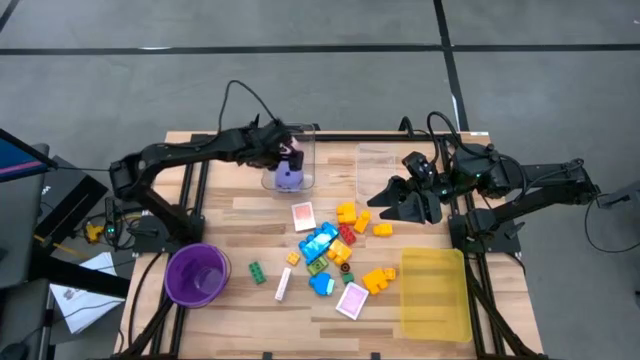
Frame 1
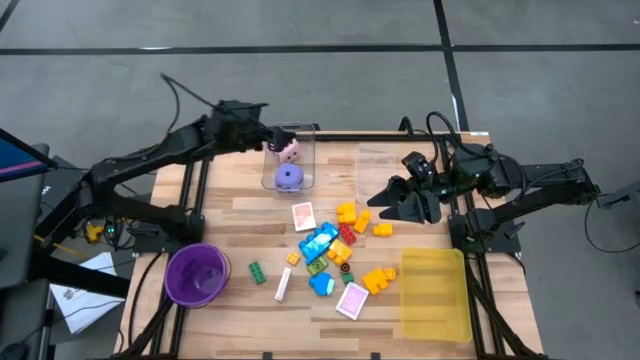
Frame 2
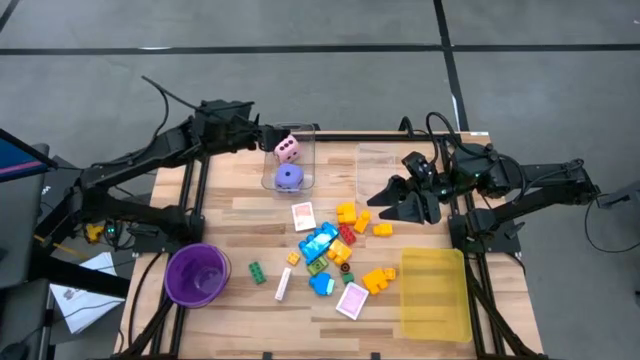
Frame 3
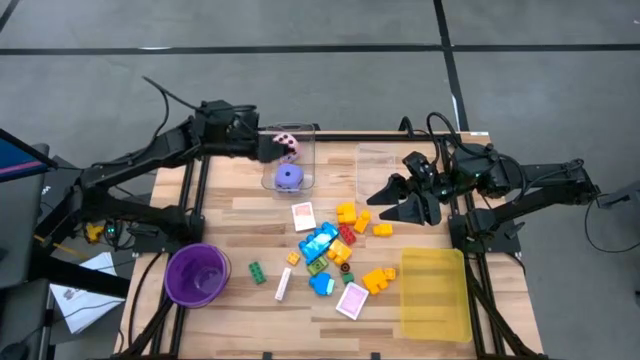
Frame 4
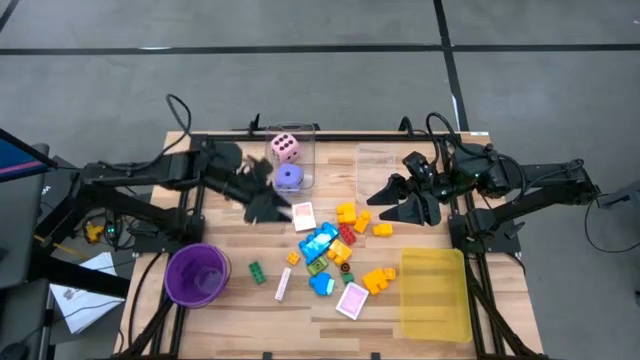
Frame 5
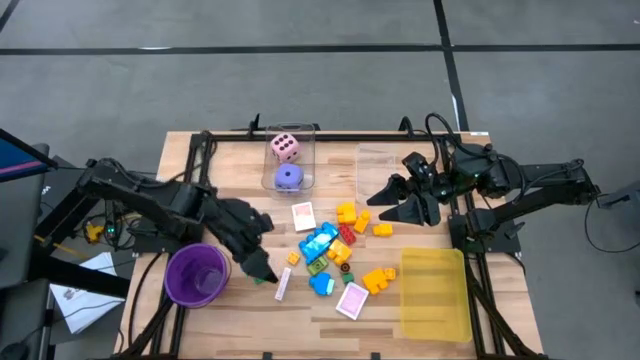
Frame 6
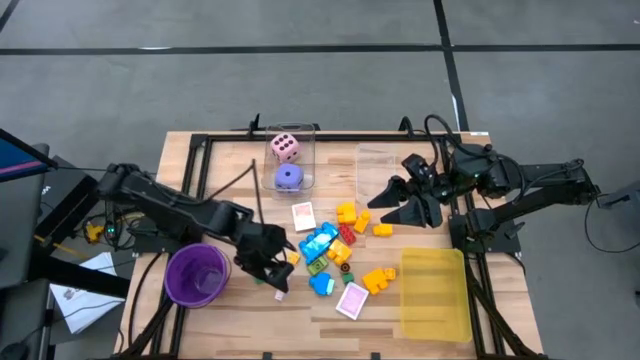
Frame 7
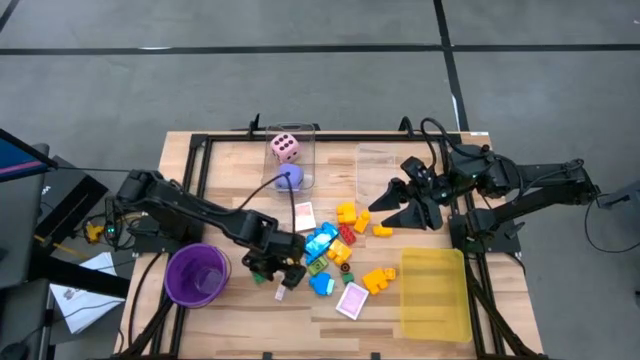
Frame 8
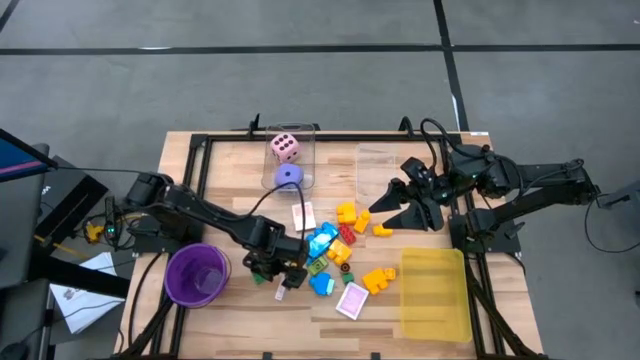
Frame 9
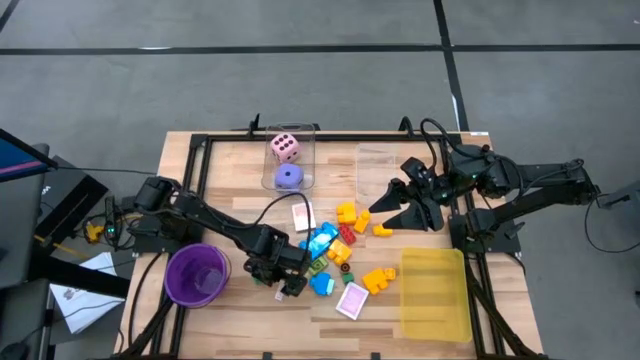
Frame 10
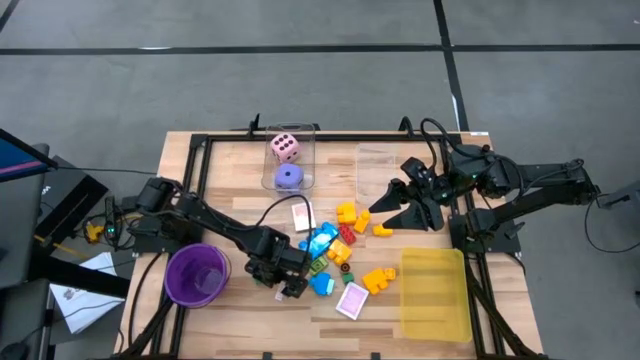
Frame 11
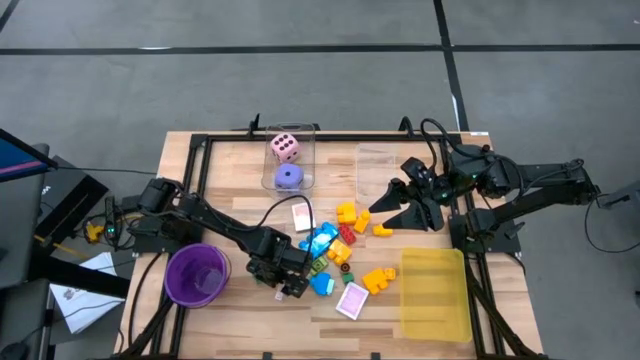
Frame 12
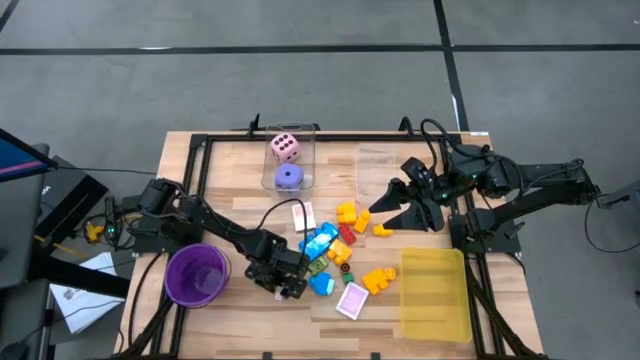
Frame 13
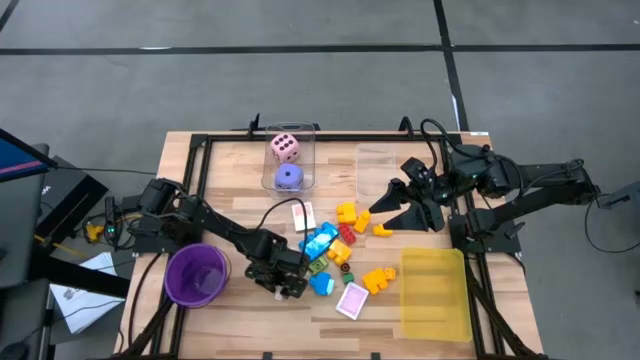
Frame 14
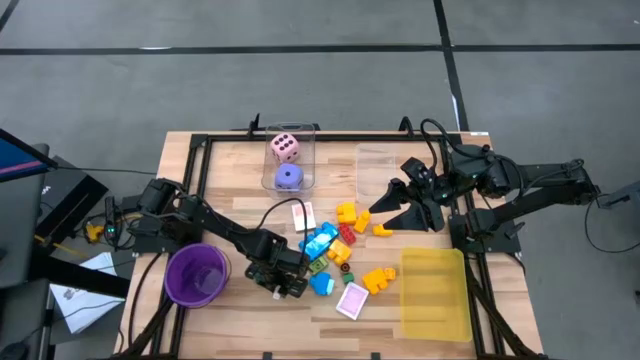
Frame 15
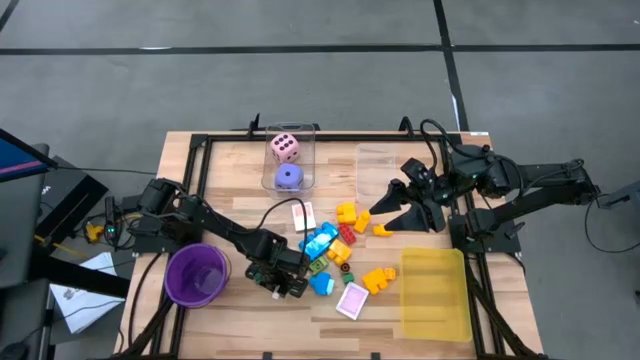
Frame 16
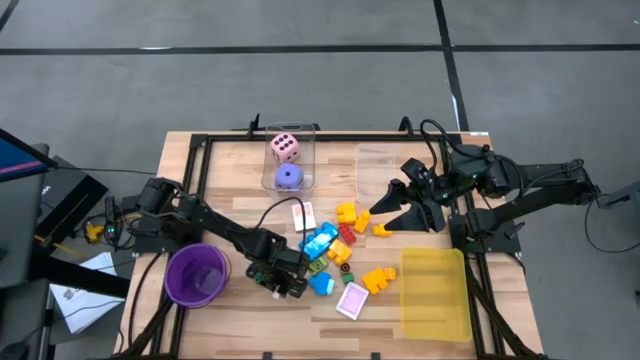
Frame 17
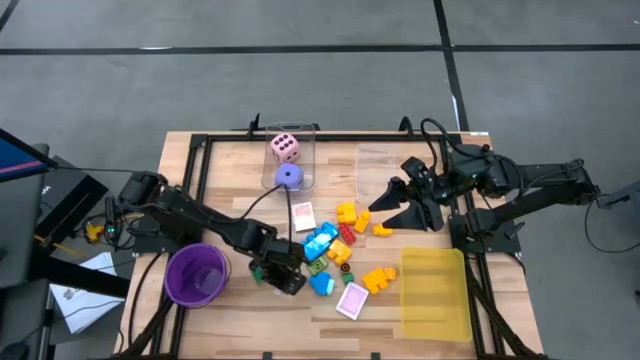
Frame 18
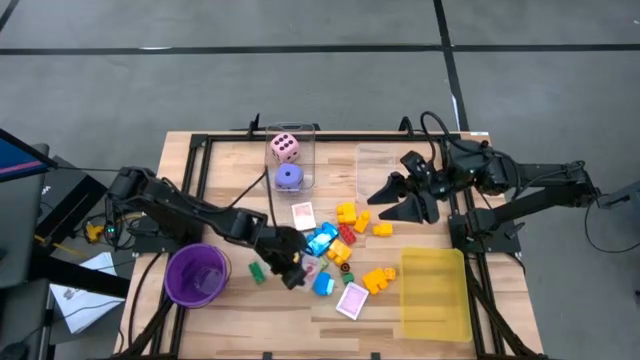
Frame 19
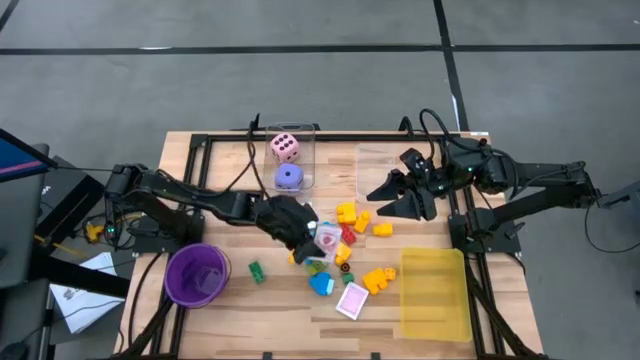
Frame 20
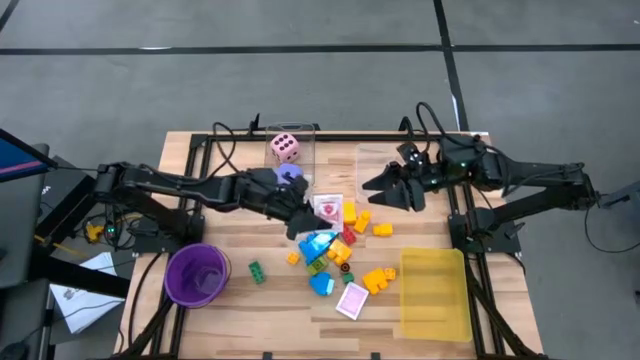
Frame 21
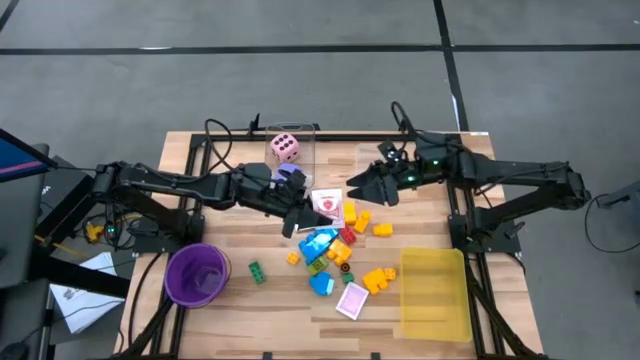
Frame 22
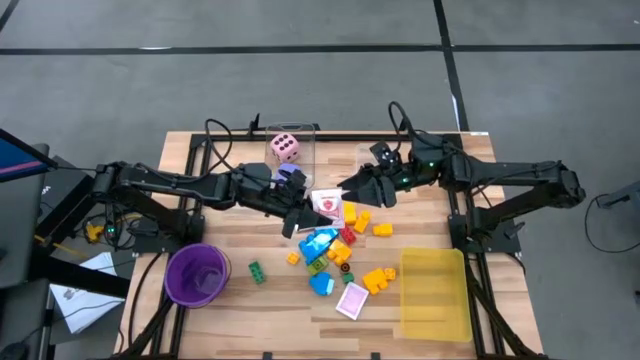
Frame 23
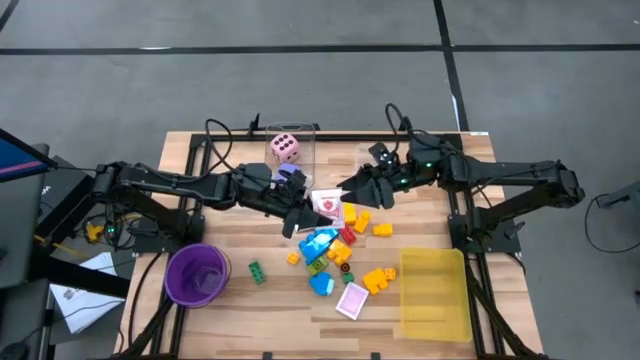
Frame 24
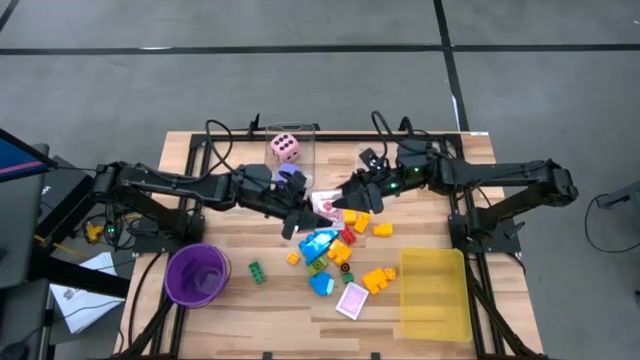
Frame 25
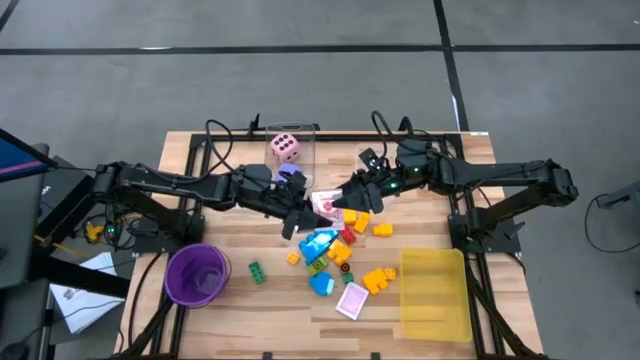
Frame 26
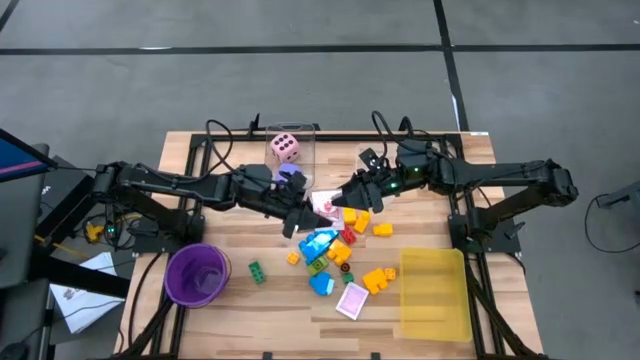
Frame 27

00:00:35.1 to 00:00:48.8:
Task: Pick & Place Toys
Put the red deck of cards into the right transparent bin

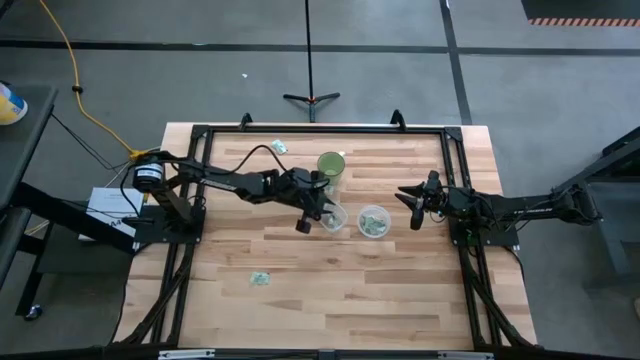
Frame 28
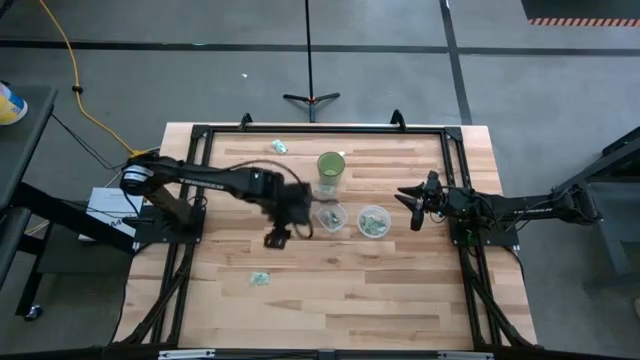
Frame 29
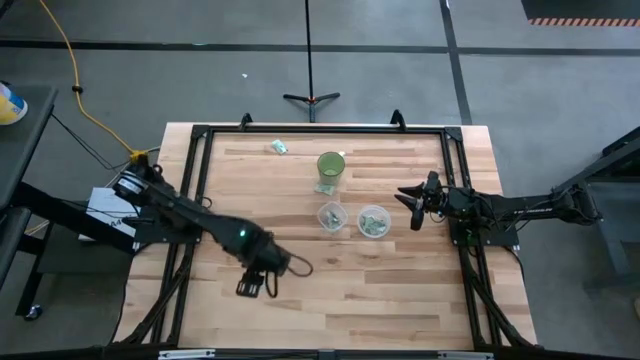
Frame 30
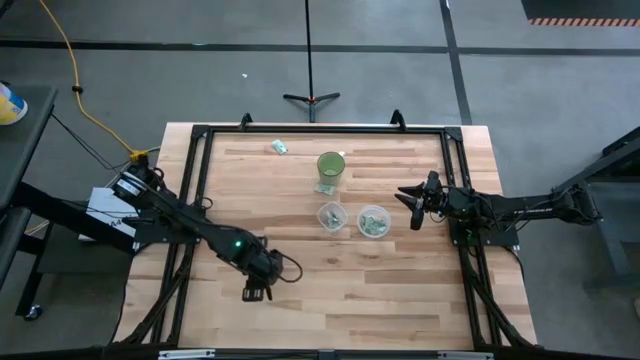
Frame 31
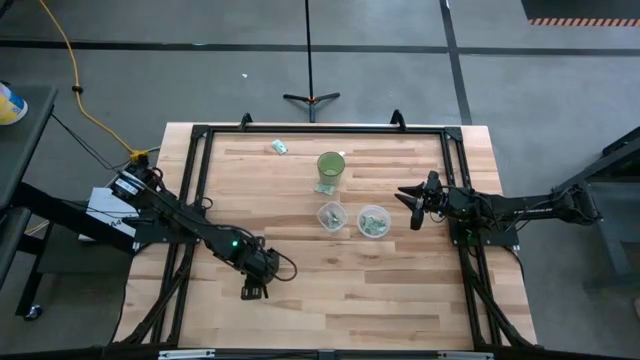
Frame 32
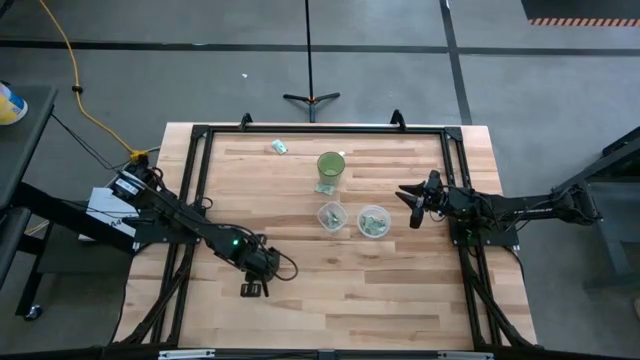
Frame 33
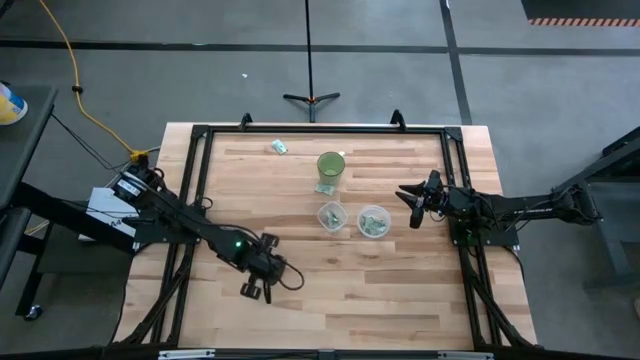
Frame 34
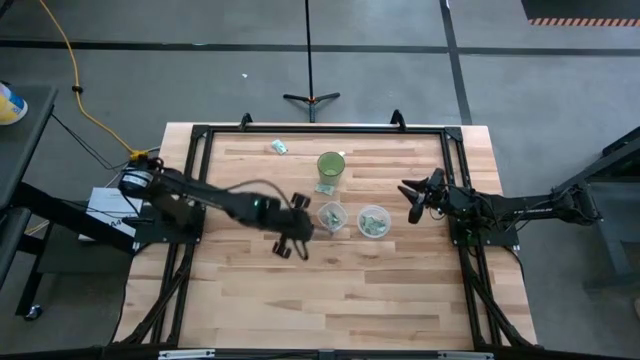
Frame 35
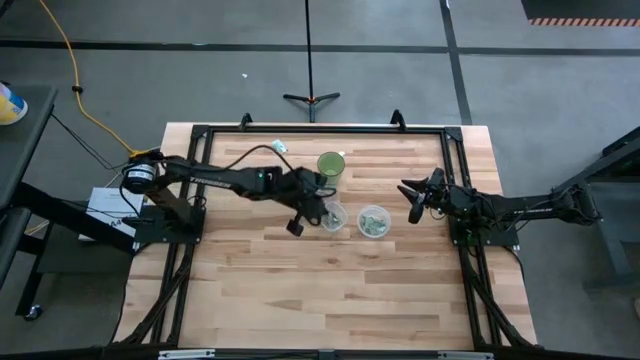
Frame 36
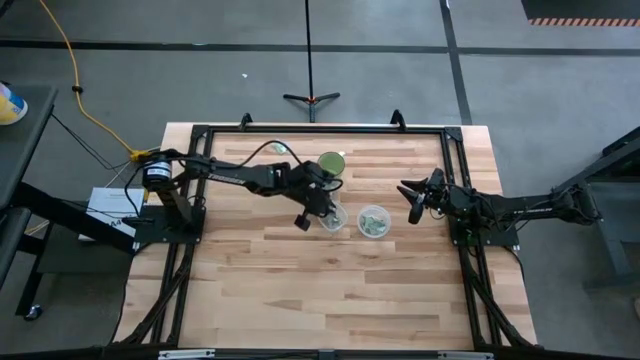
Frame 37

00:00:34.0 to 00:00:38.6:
Task: Pick and place items into bin
Put the stevia packet into the left transparent bin

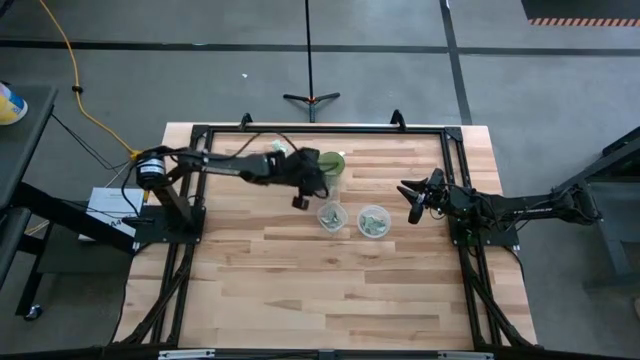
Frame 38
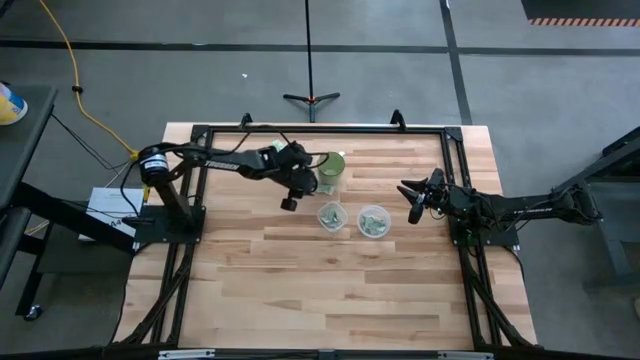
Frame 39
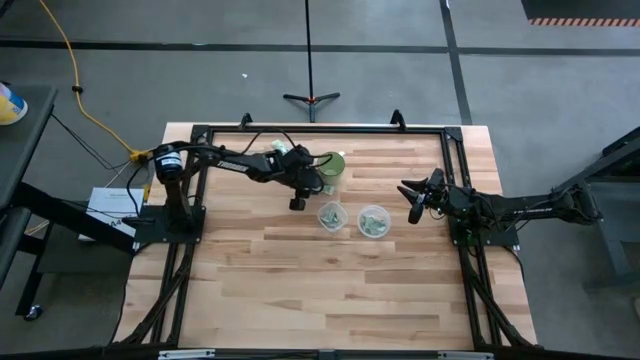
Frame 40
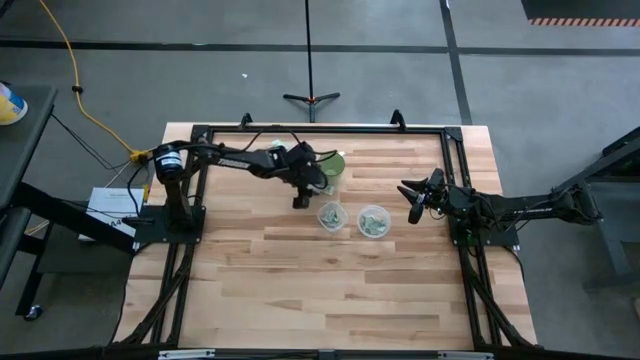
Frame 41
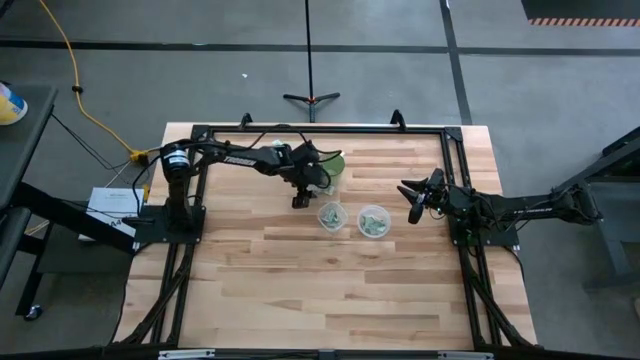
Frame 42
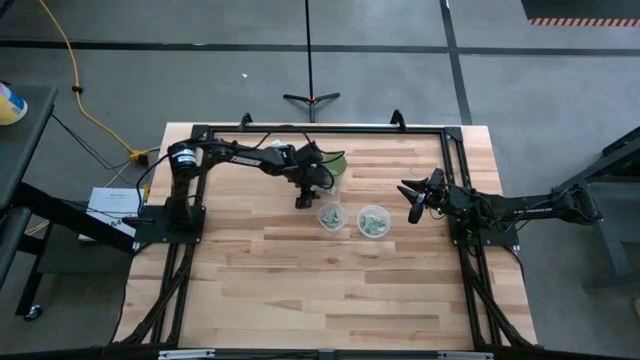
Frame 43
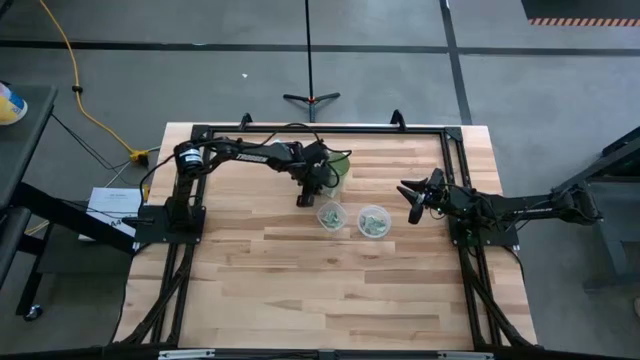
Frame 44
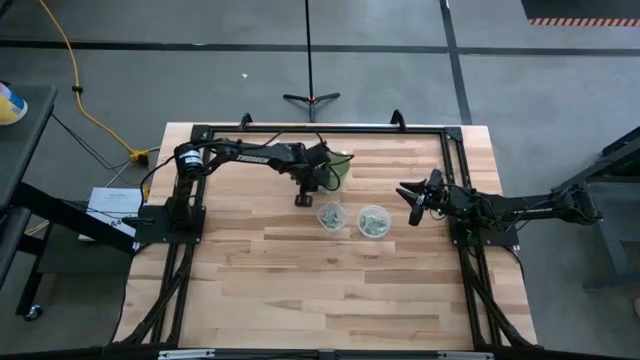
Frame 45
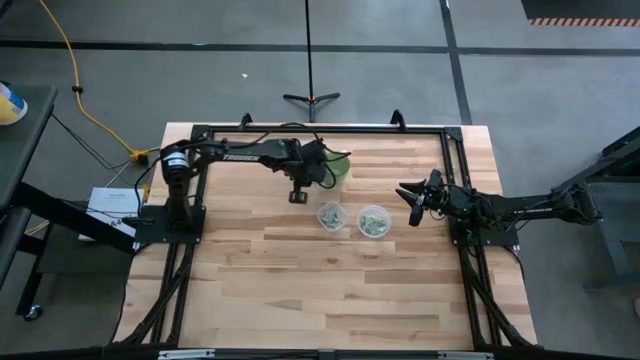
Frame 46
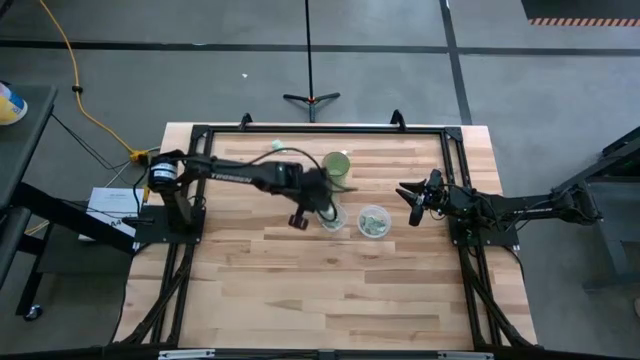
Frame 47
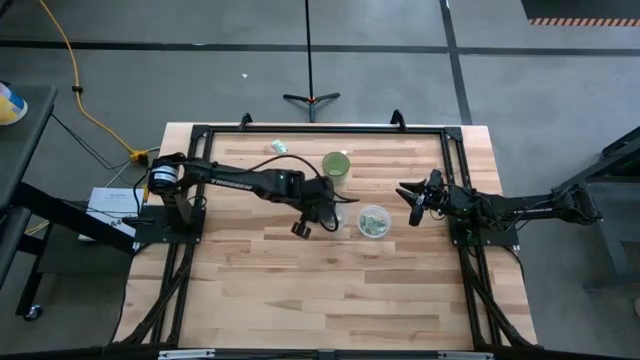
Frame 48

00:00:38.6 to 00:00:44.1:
Put the stevia packet into the left transparent bin
